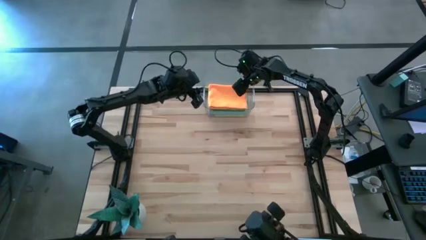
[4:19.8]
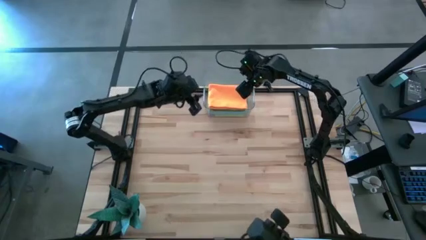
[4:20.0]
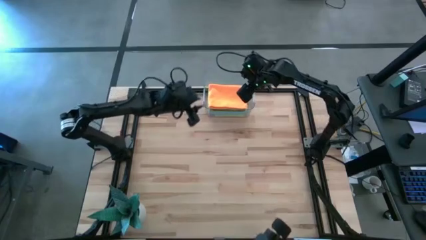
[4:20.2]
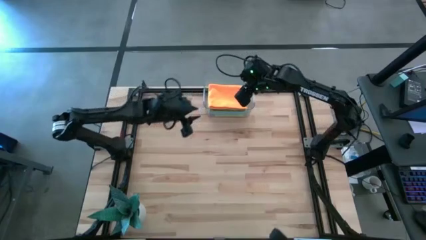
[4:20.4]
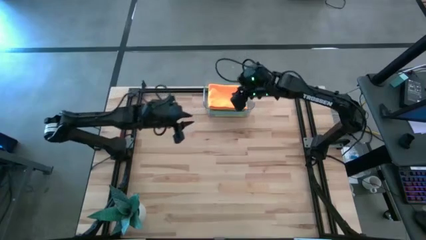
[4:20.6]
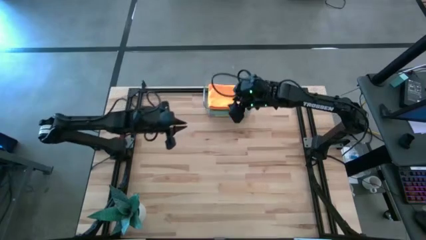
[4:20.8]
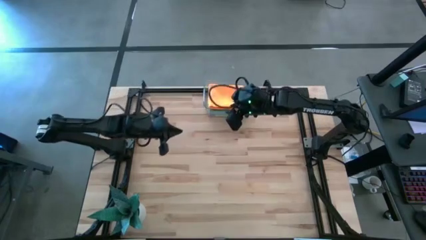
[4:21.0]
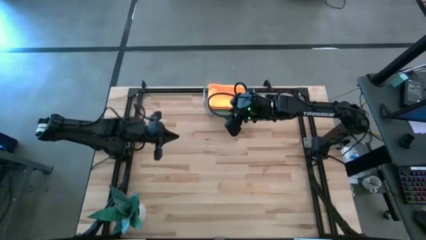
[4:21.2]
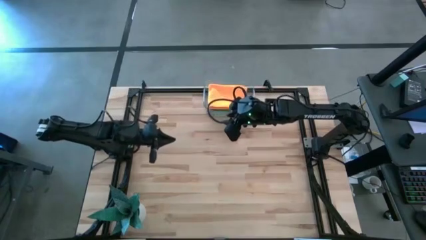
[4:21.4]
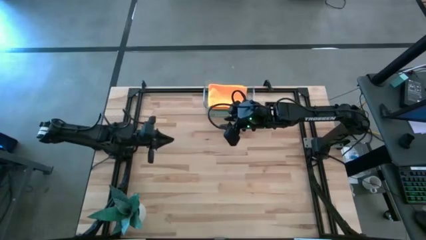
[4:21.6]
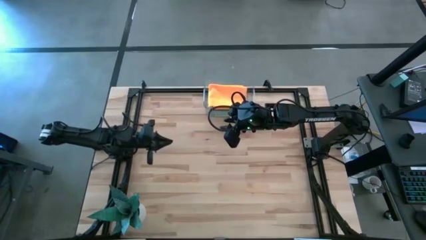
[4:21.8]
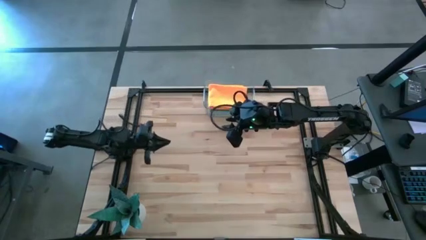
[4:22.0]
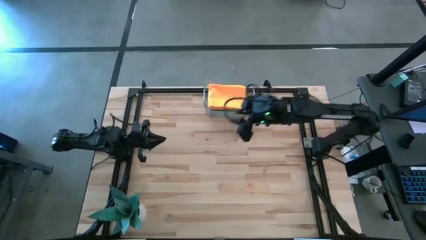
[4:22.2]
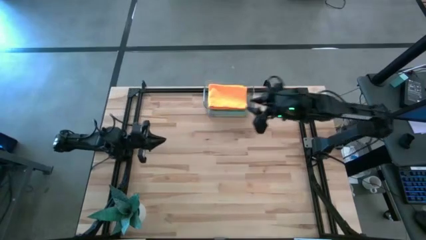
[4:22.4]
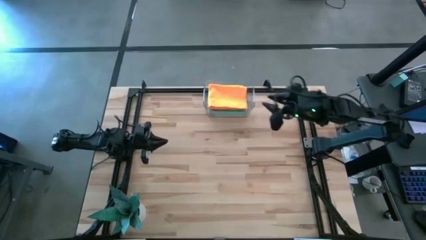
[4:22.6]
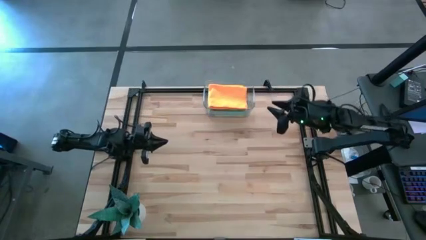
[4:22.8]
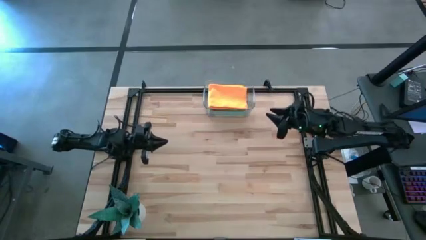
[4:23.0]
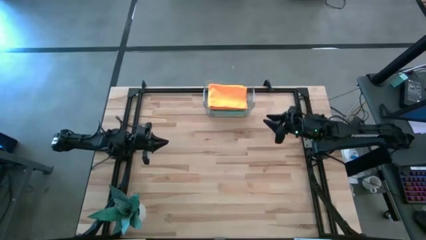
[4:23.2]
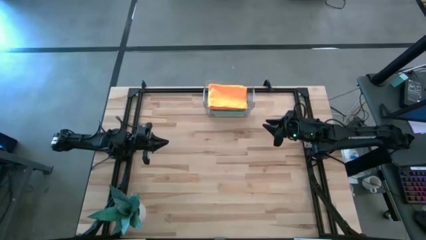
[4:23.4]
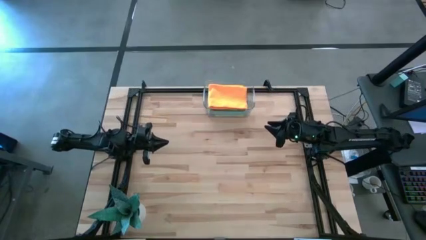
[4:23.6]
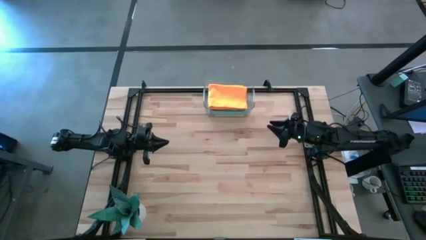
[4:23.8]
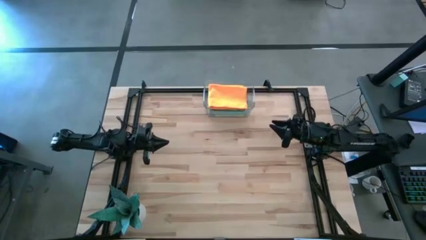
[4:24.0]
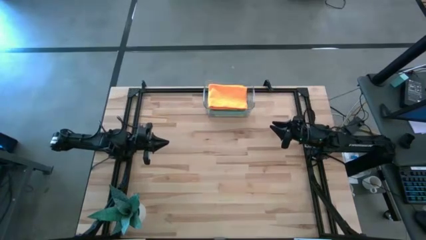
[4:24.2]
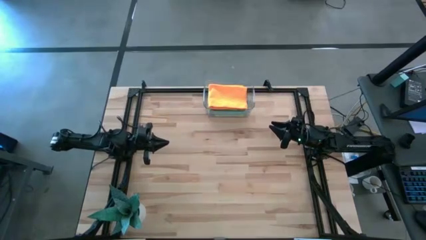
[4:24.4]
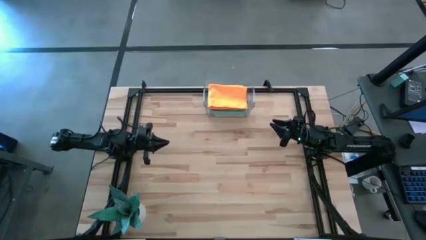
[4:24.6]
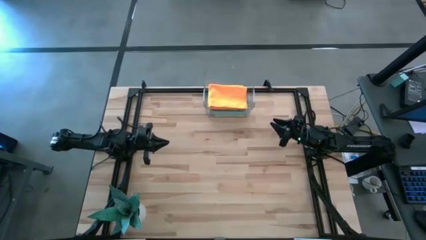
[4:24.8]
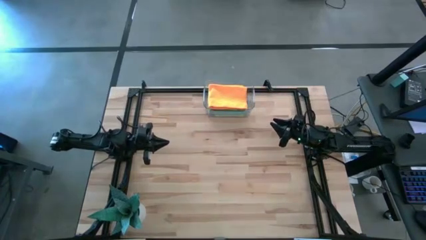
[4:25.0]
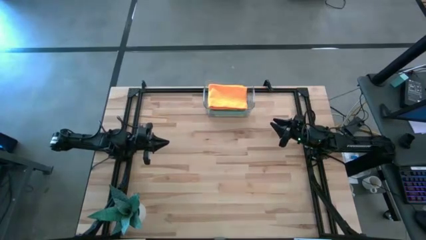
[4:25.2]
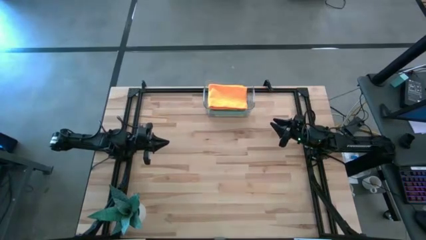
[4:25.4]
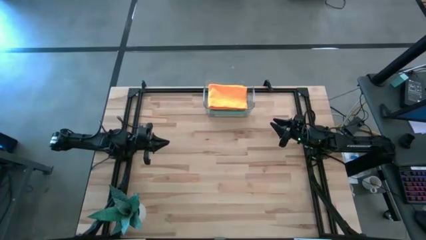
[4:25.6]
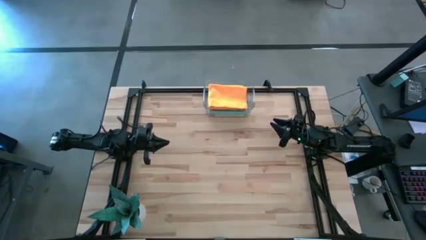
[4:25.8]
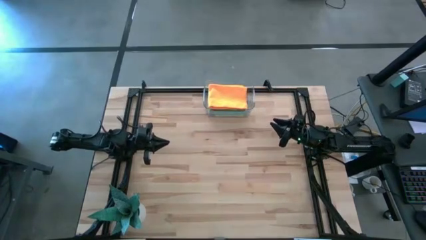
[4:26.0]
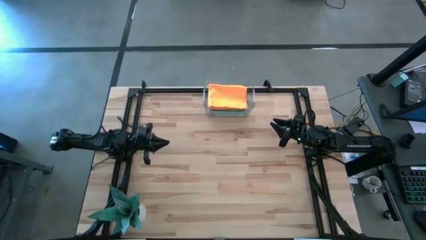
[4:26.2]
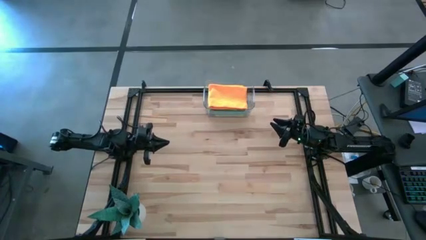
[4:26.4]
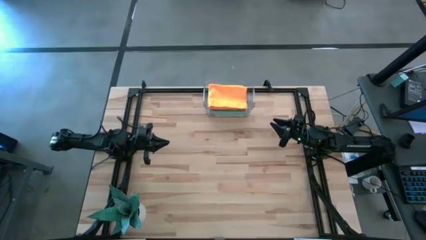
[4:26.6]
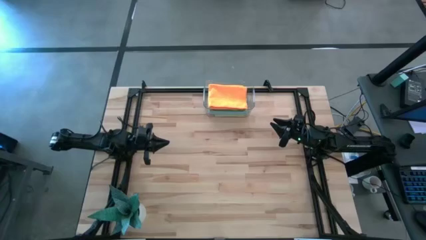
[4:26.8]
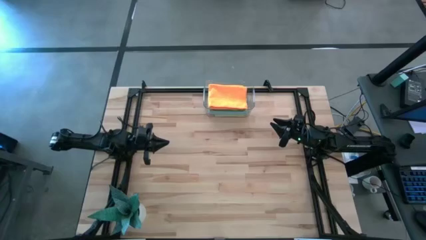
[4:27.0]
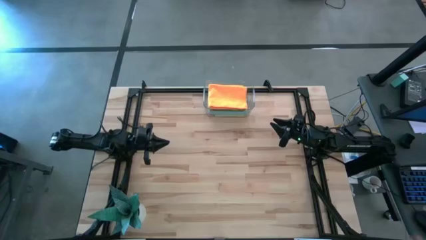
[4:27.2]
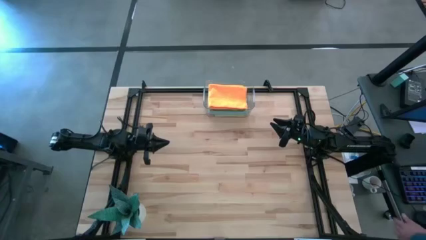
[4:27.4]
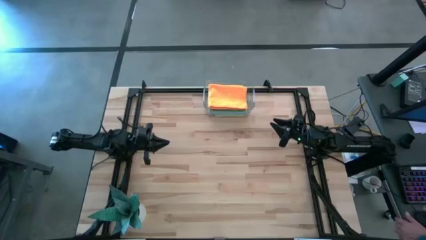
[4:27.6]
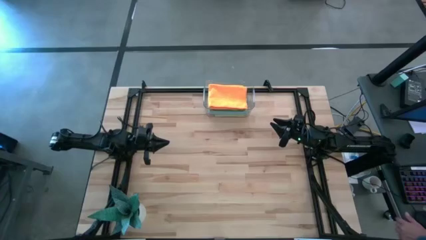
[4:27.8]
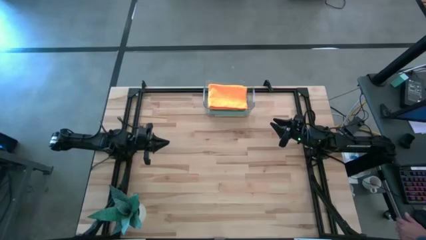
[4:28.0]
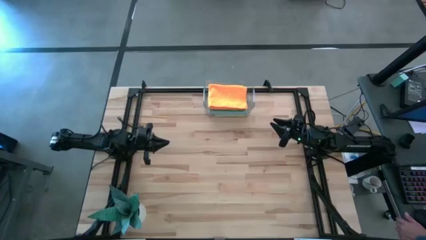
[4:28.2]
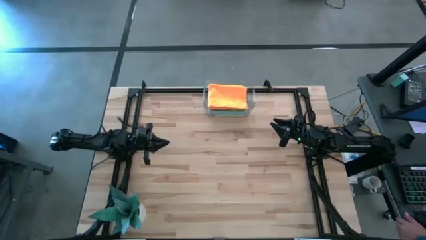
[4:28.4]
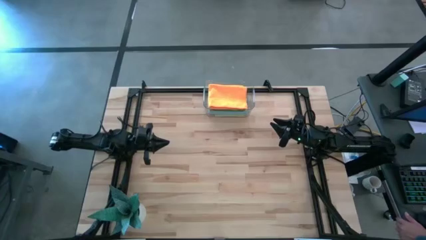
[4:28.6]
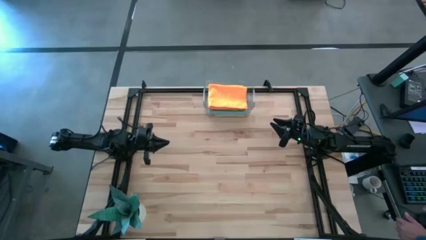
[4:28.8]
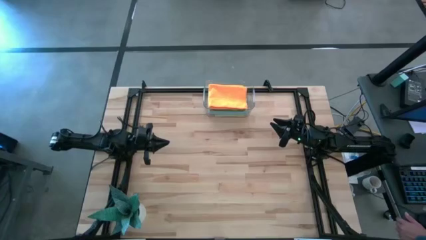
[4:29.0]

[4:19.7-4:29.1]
Task: Fold microfiber towels
Return to Home Position

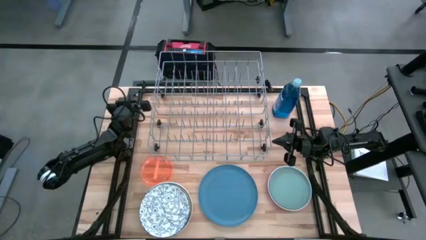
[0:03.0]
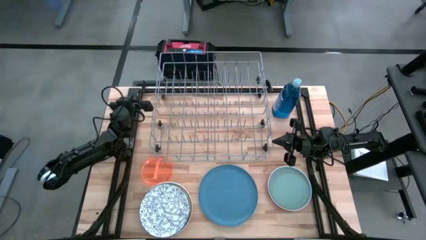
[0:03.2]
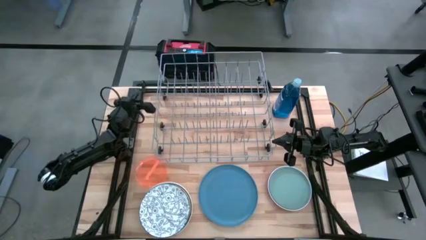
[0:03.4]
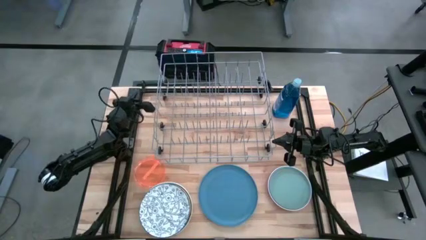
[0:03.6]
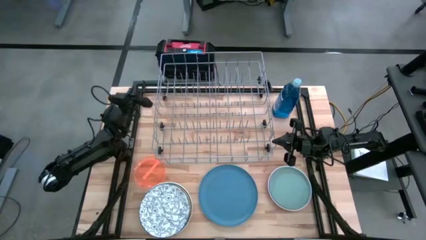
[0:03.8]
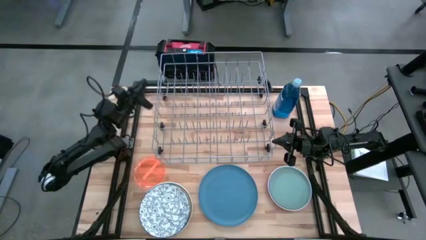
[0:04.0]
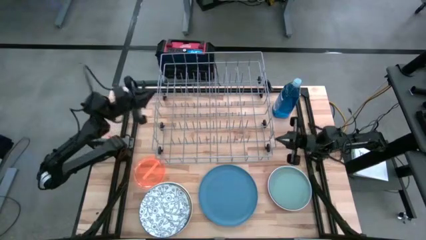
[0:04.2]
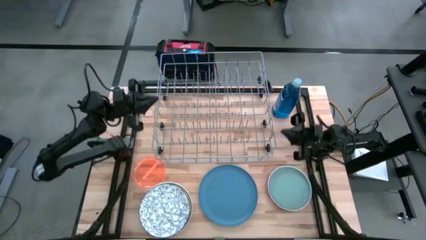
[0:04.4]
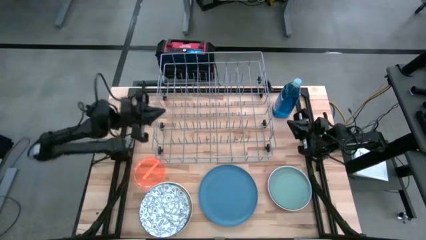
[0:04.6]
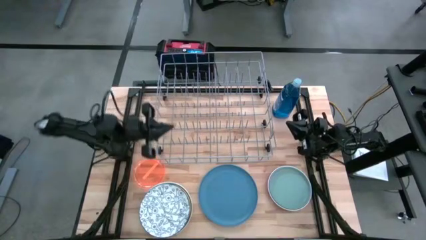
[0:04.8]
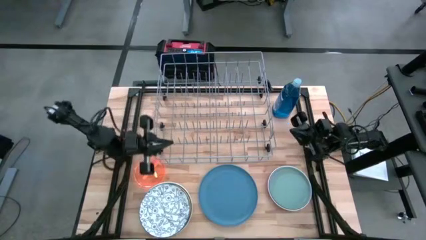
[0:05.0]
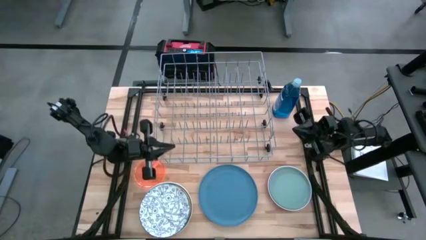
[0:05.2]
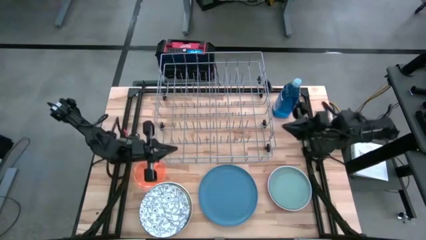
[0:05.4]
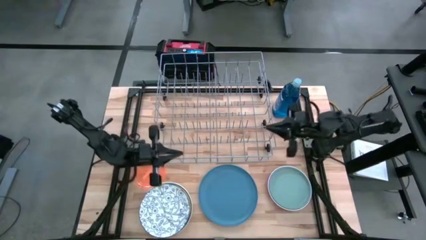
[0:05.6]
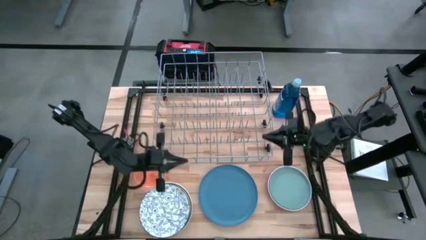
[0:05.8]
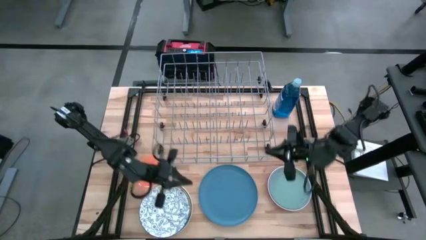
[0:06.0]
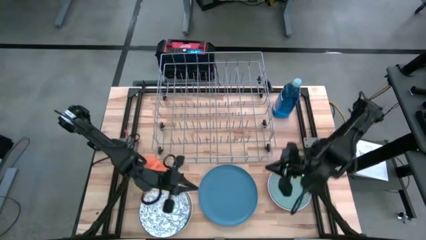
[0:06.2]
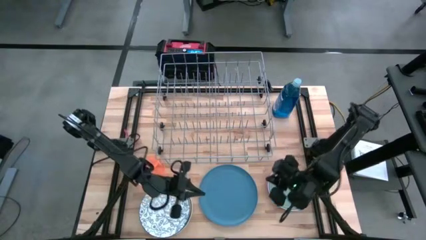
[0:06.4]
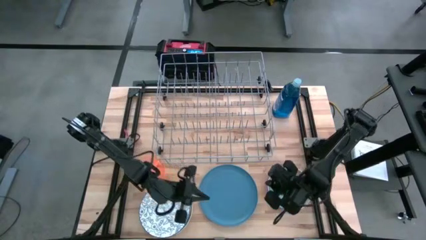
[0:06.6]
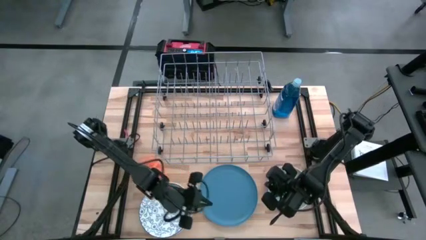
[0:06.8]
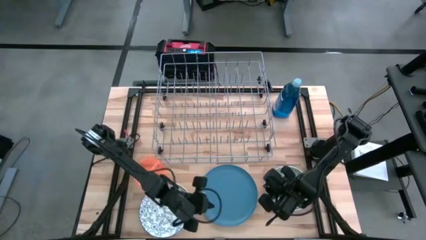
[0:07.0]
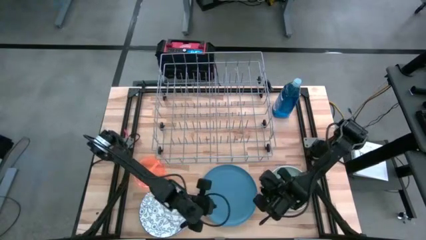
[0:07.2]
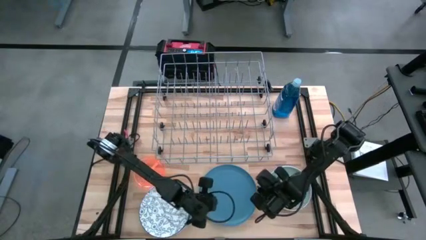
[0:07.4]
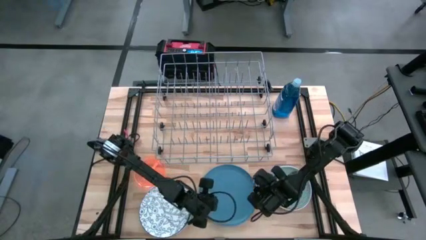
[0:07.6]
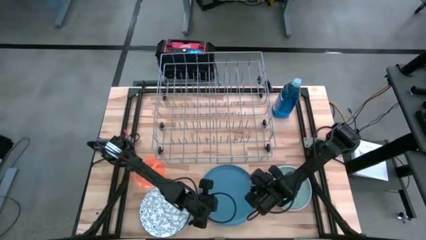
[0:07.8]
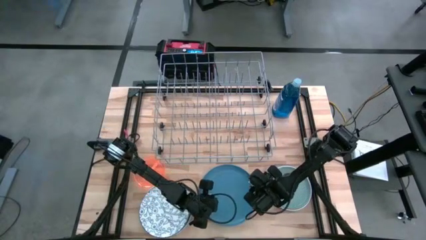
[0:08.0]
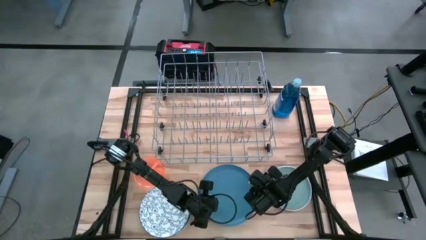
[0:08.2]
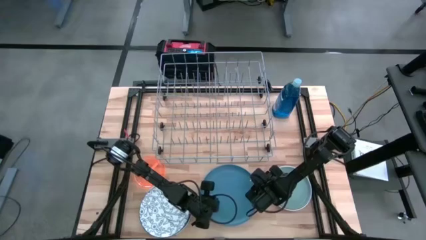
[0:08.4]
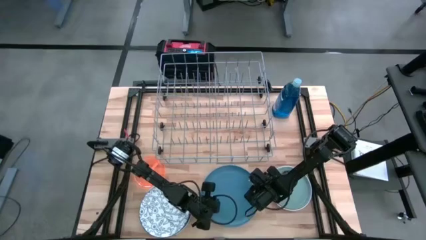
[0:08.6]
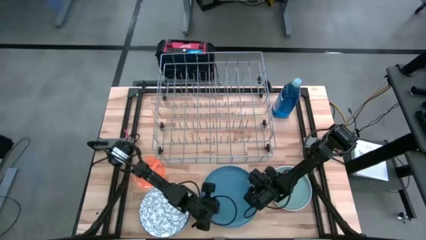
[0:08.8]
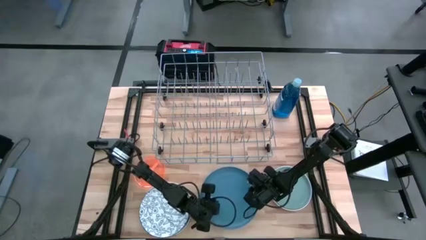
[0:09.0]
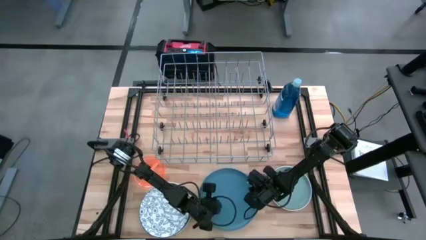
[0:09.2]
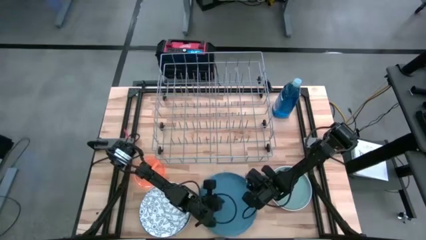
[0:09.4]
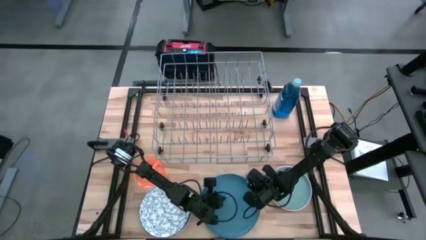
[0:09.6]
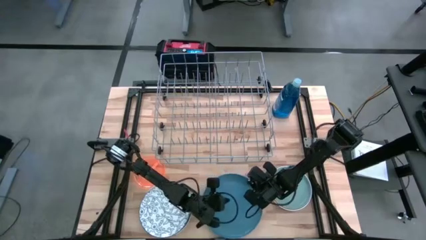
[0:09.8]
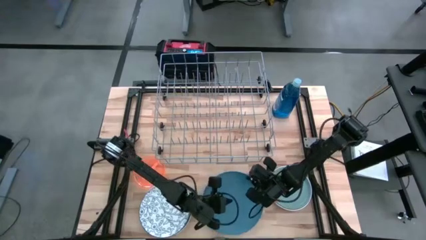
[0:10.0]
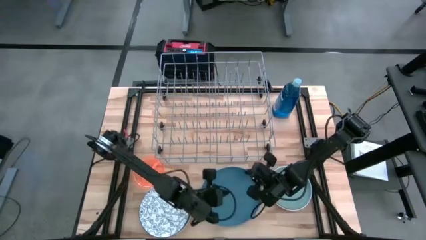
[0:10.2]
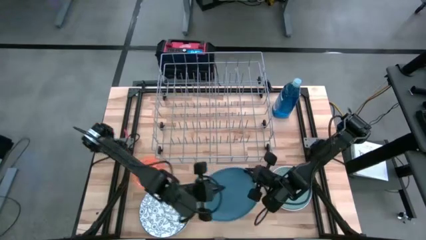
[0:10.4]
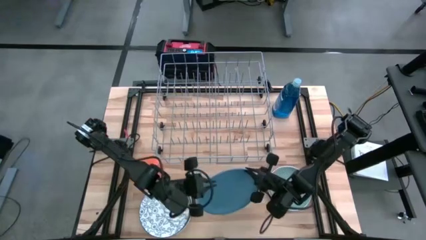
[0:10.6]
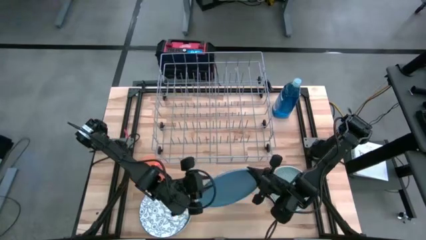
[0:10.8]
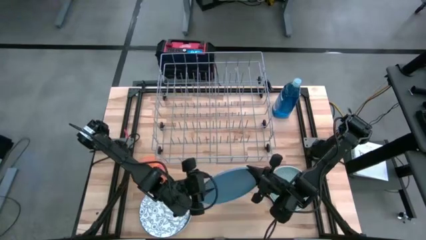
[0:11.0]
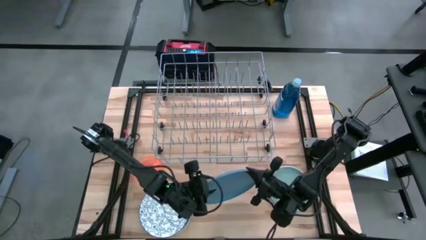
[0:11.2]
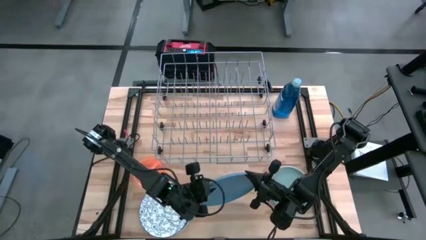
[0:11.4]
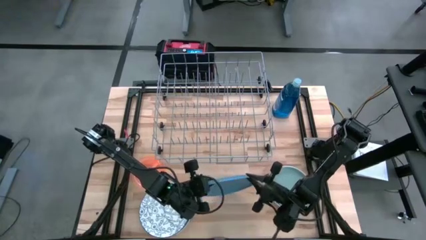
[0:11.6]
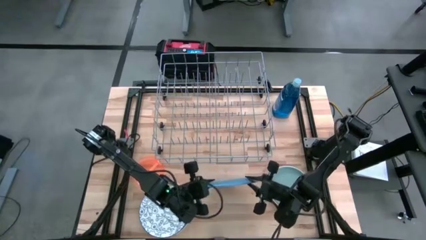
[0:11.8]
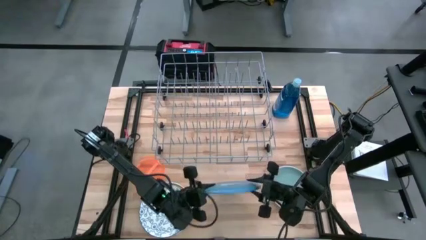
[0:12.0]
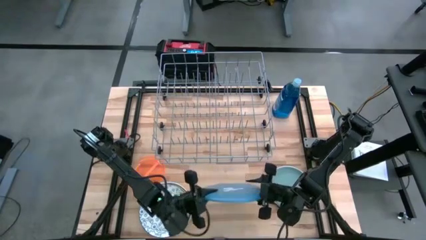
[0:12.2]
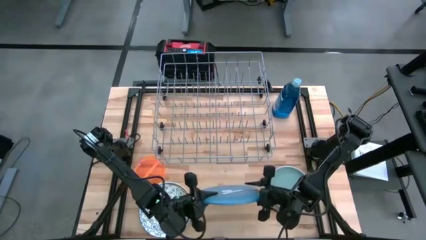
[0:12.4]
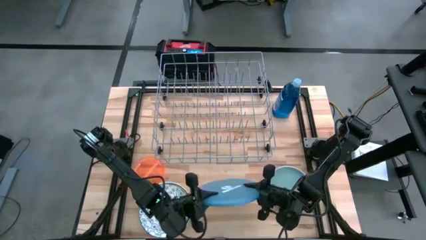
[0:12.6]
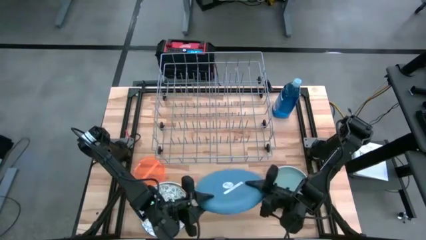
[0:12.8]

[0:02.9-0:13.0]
Task: Sort dishes
Put the blue plate in the dish rack
